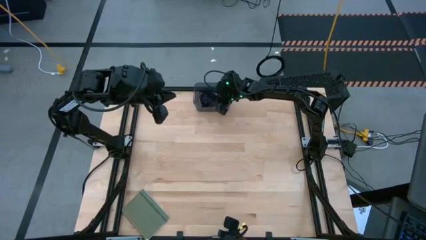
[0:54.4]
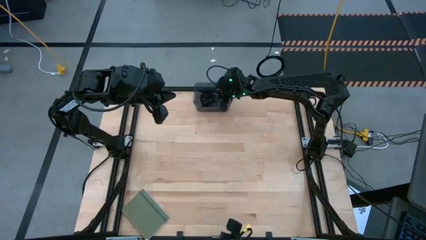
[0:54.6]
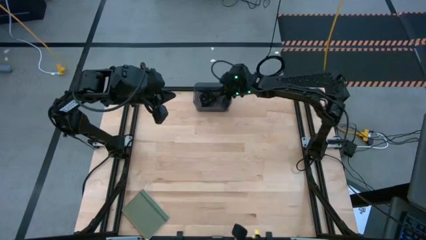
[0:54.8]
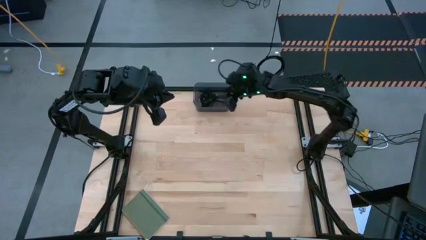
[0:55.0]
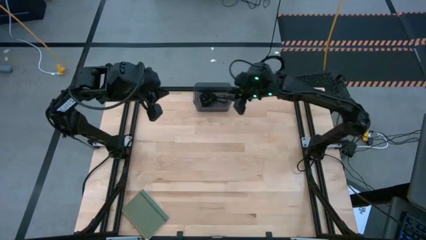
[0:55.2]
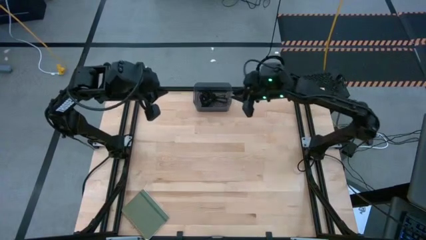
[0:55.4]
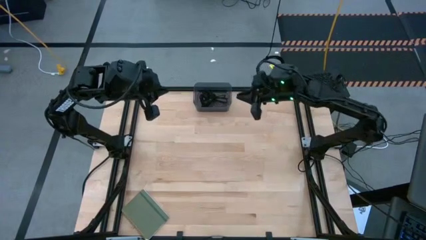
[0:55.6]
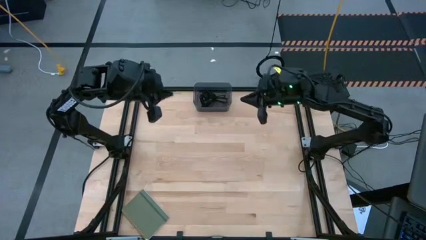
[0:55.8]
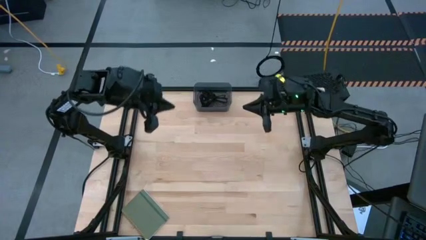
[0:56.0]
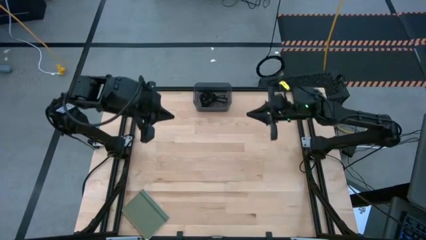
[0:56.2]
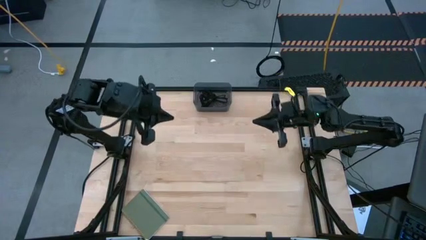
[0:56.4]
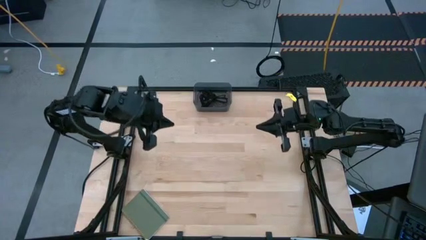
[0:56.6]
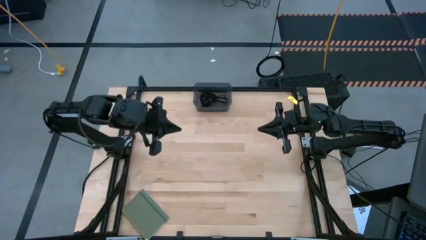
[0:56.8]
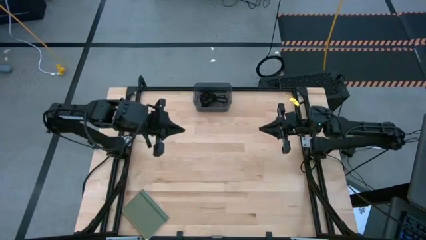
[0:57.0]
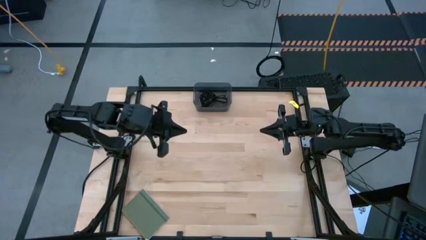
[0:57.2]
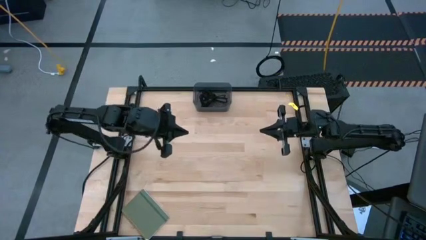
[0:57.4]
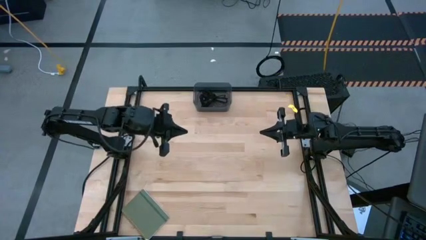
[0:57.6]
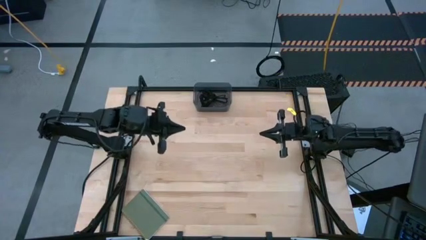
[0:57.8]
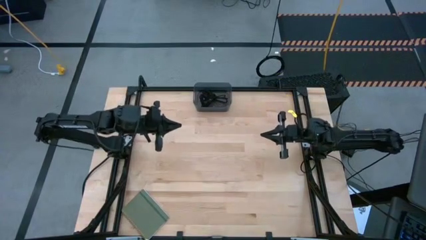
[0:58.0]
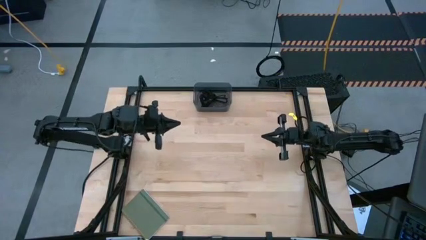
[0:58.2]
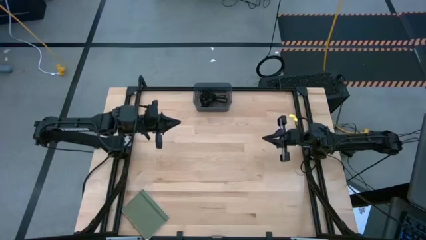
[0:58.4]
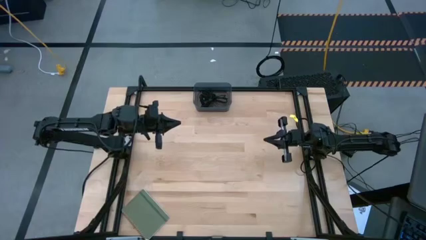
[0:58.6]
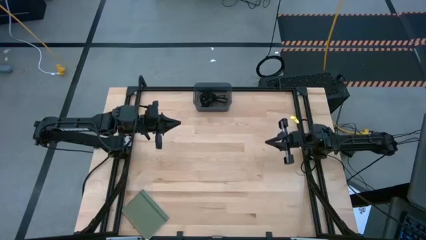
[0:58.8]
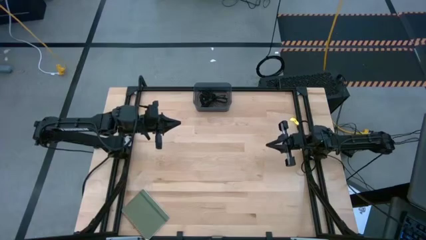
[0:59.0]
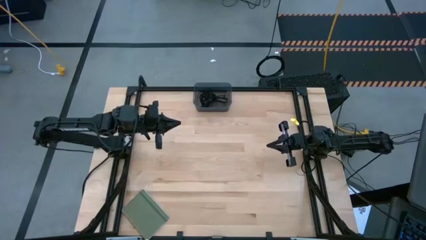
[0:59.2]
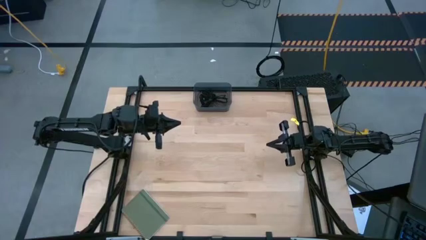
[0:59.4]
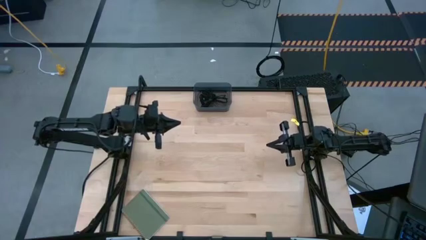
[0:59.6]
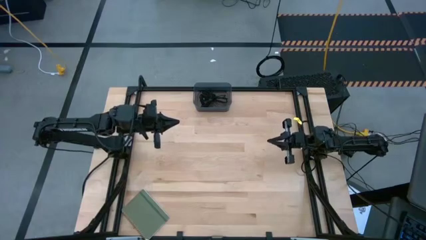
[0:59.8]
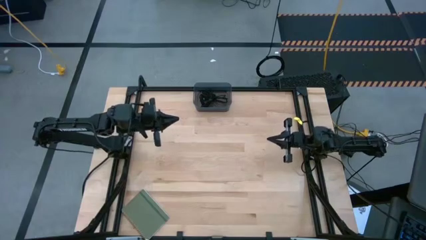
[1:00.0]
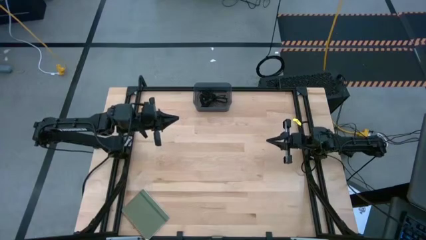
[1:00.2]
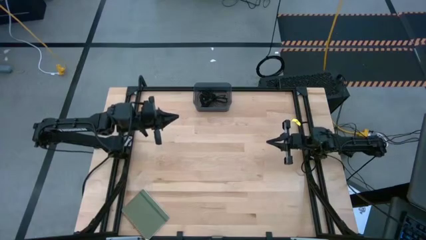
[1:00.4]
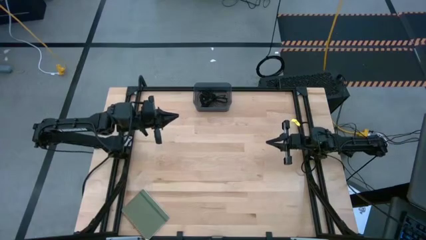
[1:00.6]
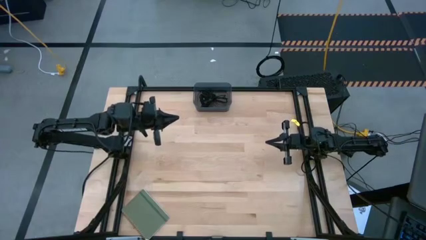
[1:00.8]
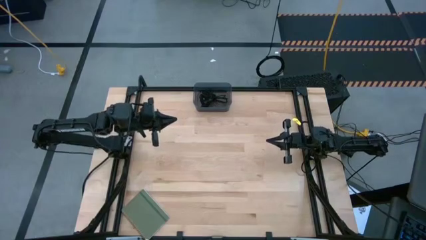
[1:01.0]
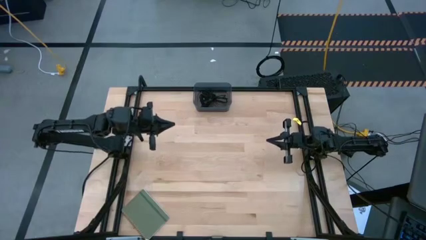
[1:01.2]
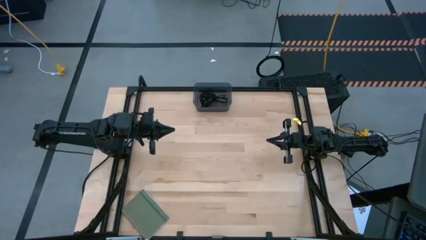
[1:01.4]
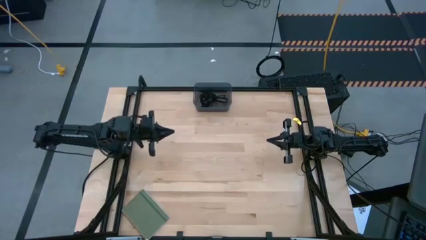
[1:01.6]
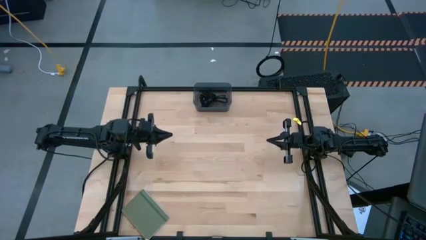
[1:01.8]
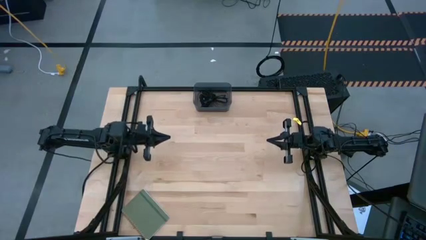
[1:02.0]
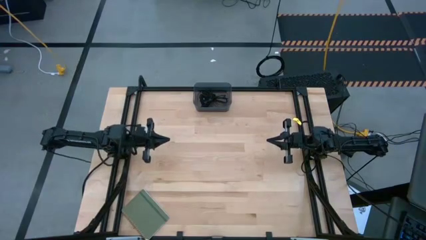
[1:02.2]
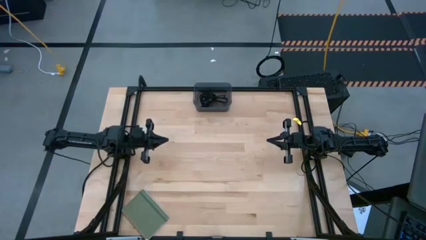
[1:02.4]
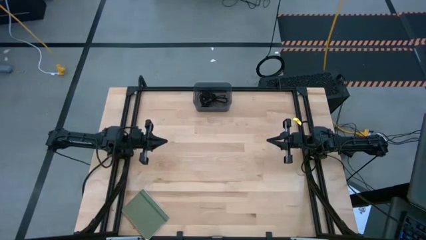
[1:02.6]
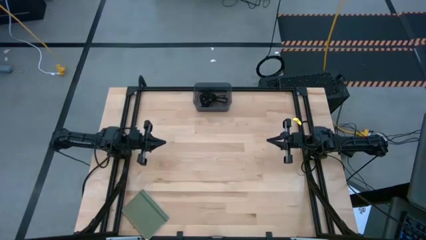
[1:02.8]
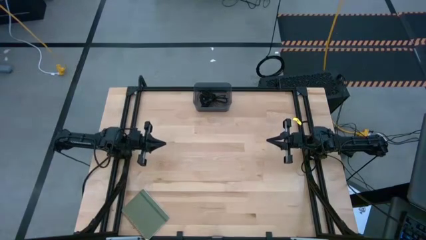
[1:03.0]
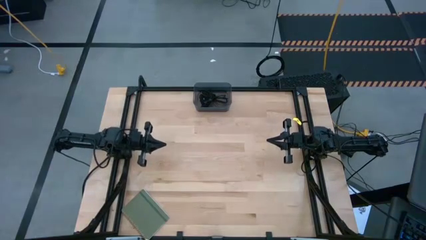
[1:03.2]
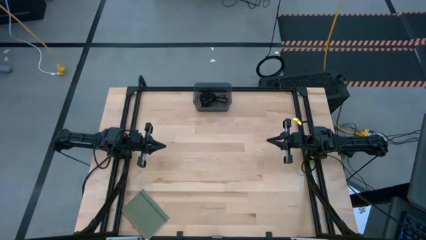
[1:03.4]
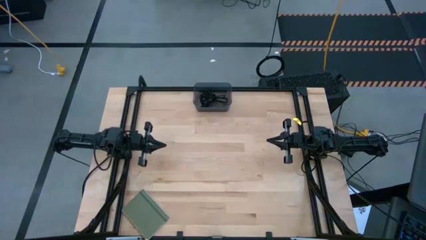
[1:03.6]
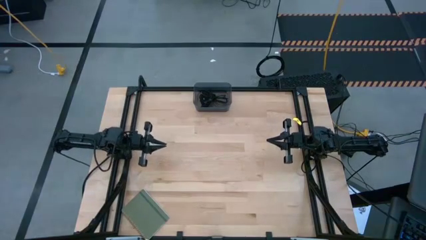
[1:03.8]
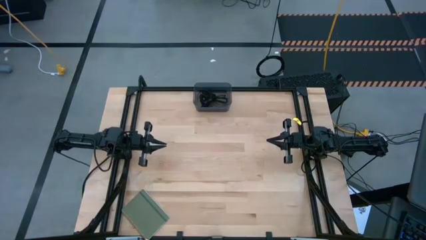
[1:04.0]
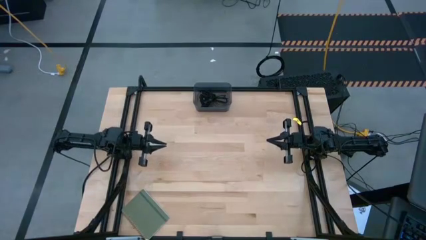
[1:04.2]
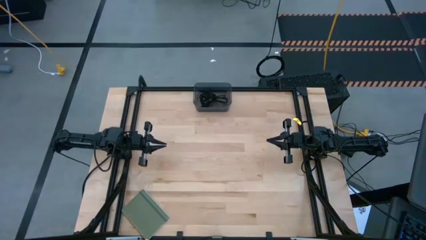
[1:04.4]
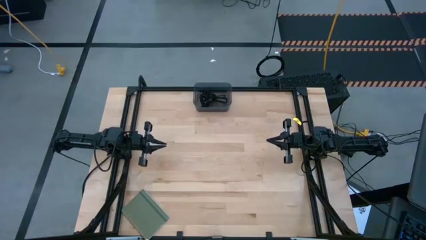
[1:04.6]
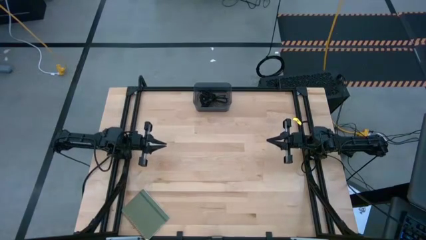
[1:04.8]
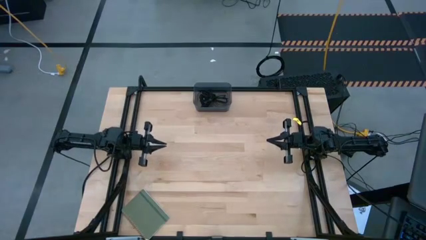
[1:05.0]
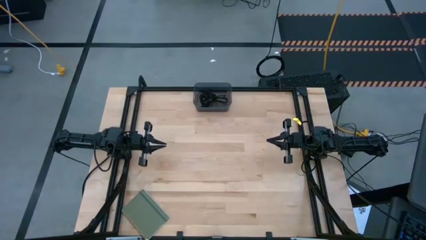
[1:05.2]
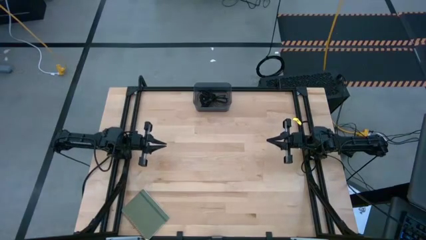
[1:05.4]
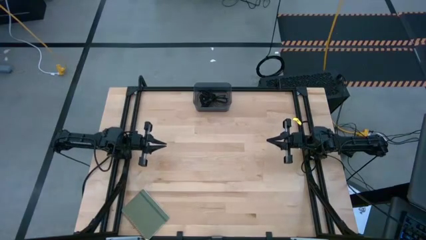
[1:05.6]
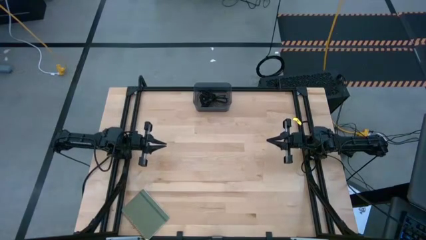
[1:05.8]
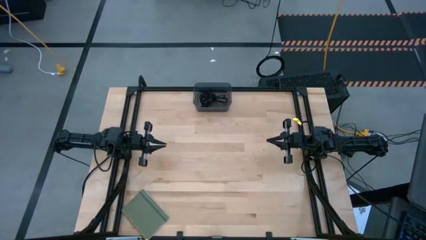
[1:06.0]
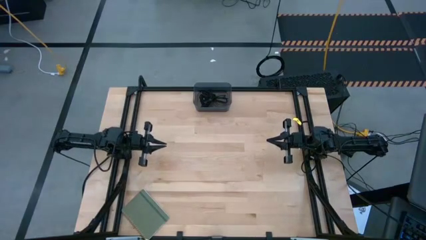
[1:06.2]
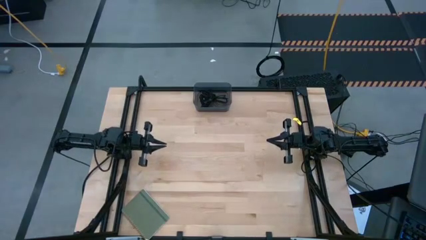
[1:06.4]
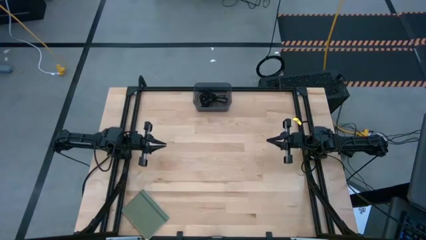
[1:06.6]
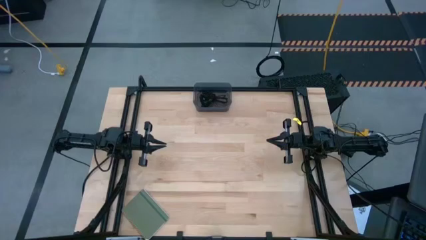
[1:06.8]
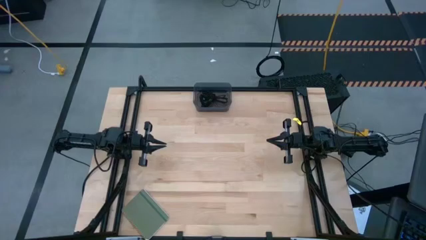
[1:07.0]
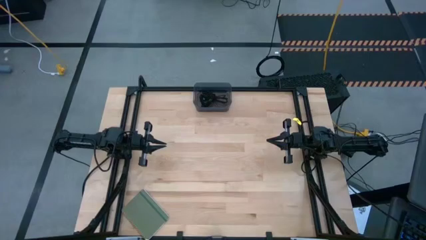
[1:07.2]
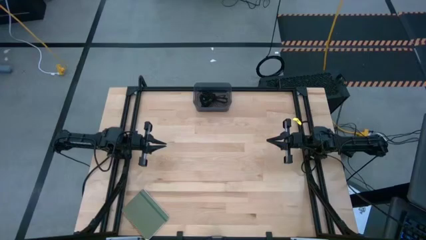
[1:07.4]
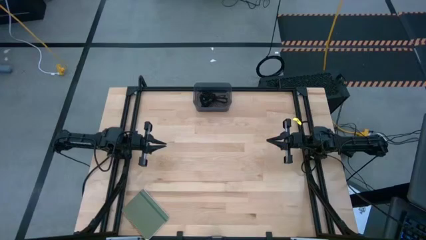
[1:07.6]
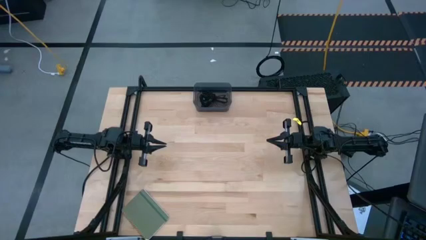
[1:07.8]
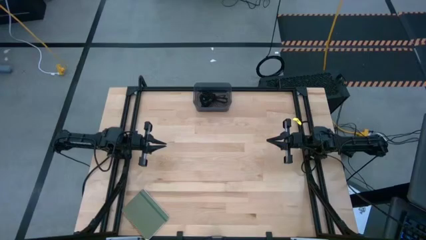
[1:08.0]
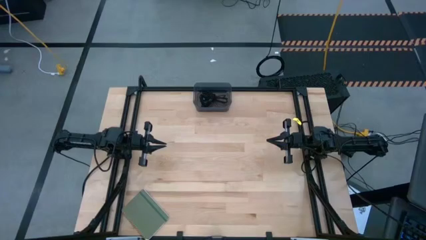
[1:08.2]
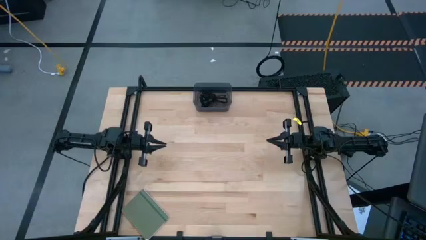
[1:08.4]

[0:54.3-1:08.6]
Task: Pick and place USB-C Cables
Return to Home Position

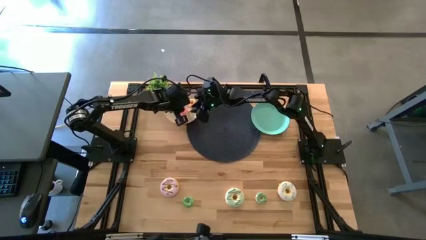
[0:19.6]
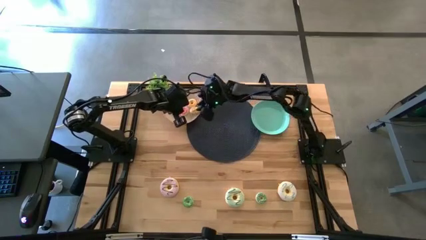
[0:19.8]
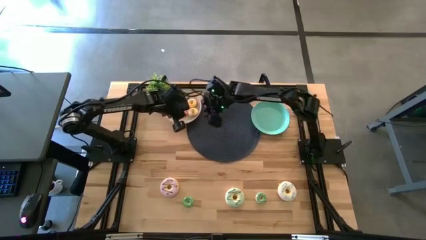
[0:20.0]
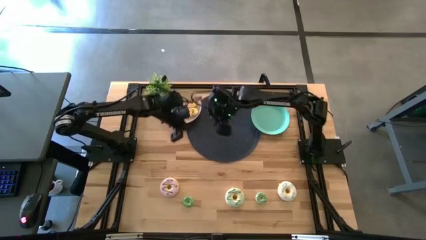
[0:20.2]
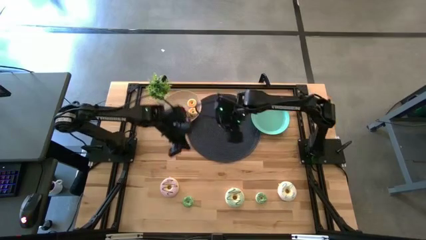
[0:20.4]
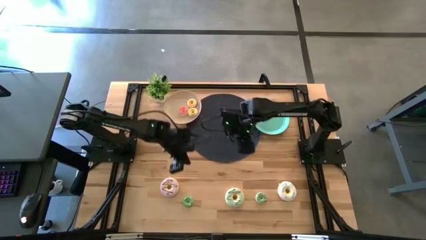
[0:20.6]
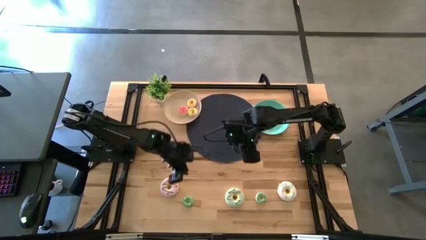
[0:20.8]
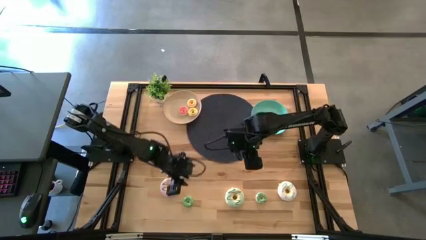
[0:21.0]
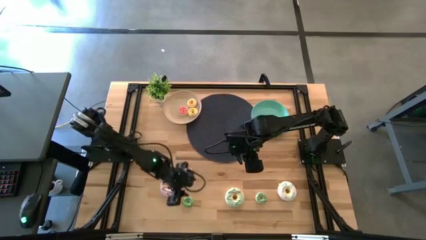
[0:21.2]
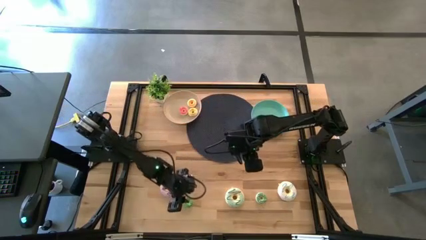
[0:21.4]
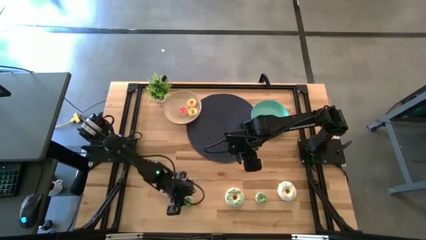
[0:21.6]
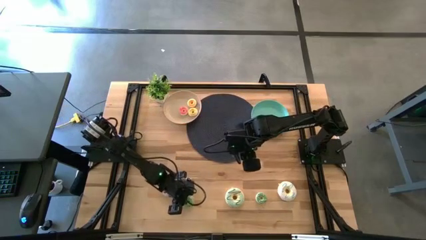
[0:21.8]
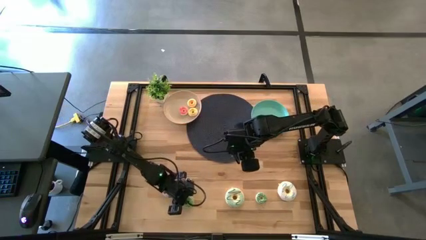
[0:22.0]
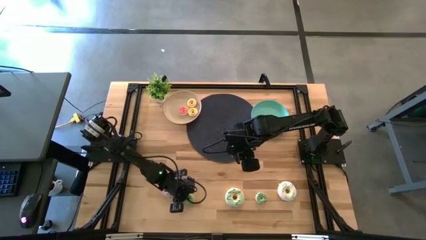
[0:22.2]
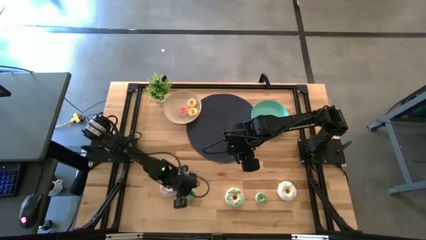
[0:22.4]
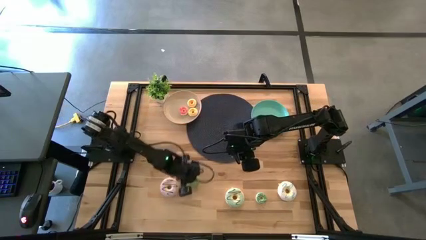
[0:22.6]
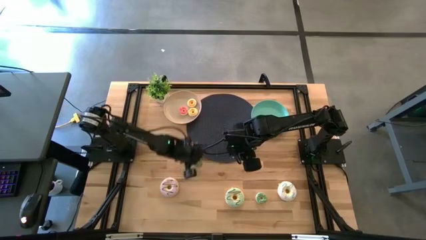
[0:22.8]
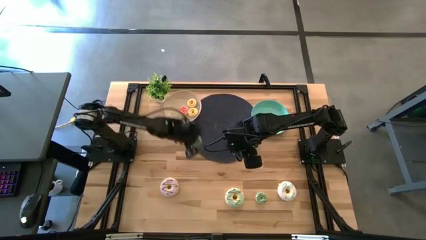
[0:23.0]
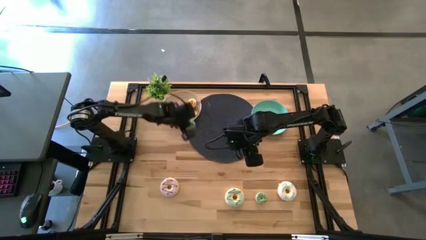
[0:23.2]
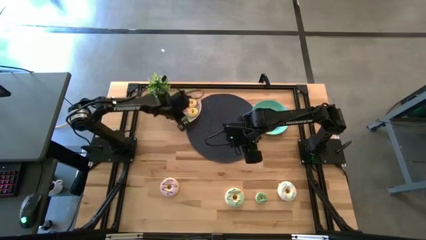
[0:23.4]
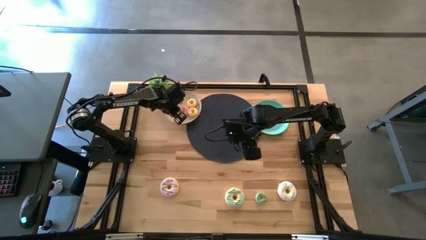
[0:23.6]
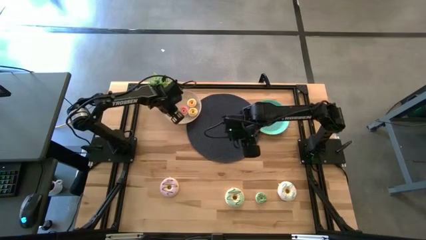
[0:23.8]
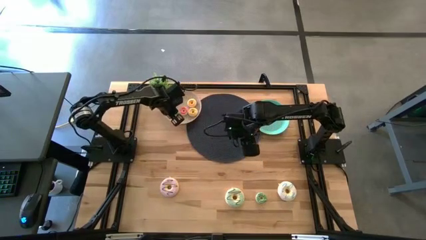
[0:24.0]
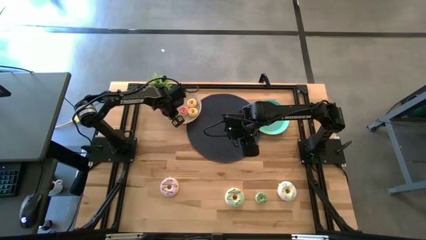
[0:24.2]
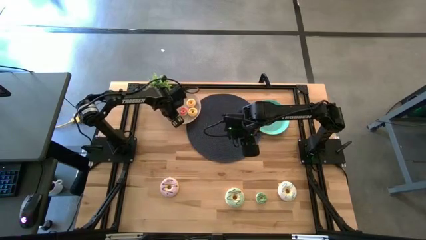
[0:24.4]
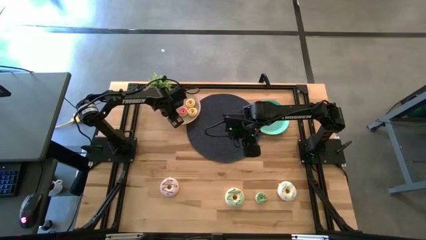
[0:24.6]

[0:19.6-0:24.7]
Task: Pick & Place donuts
Put the left small green donut on the white plate
